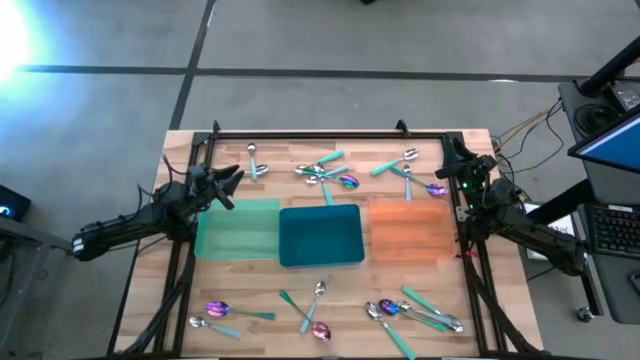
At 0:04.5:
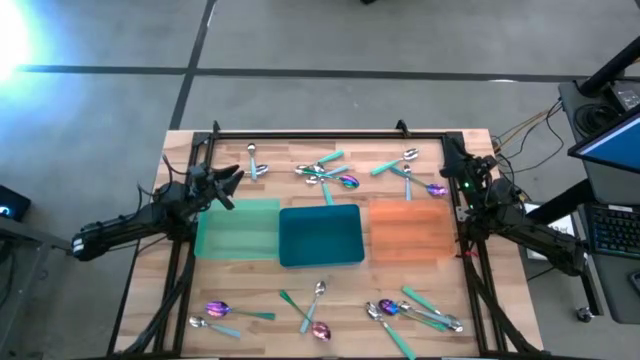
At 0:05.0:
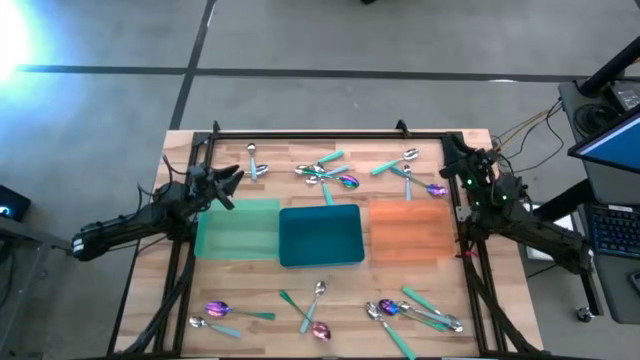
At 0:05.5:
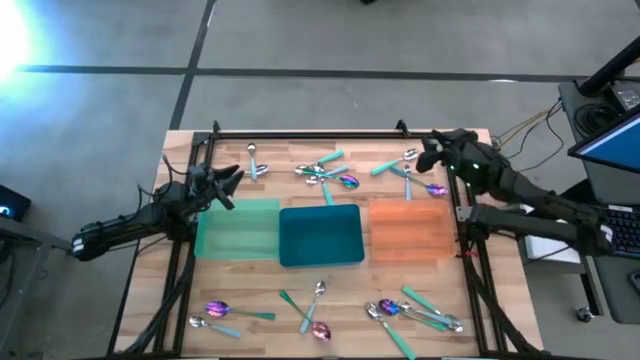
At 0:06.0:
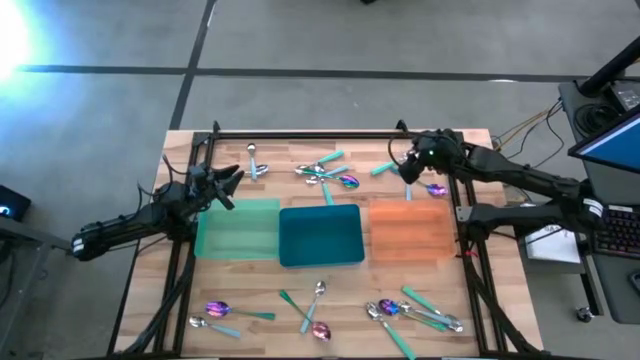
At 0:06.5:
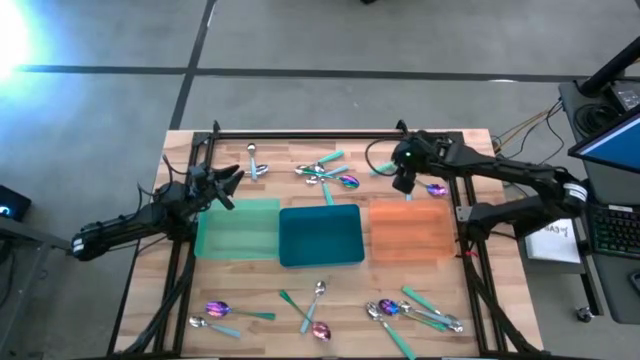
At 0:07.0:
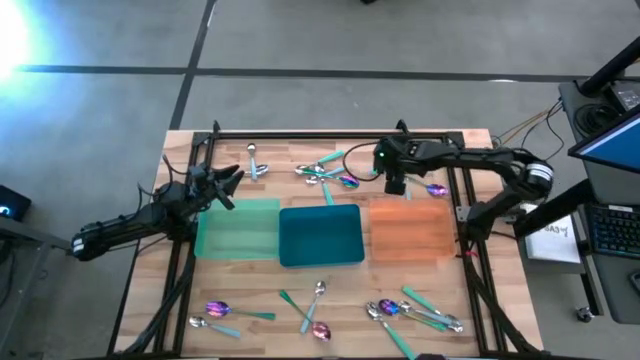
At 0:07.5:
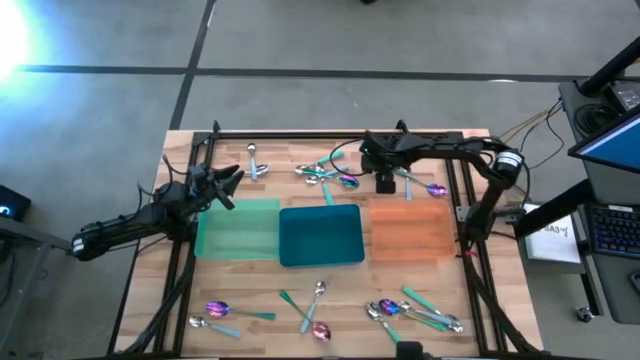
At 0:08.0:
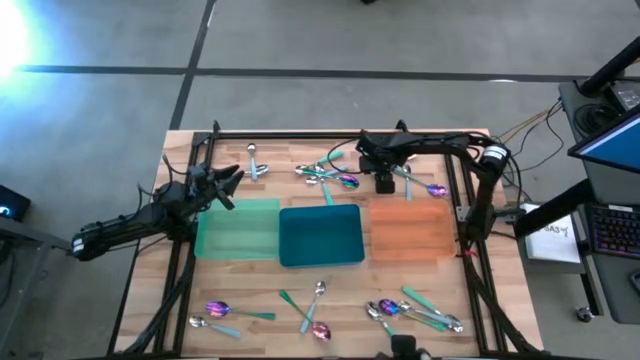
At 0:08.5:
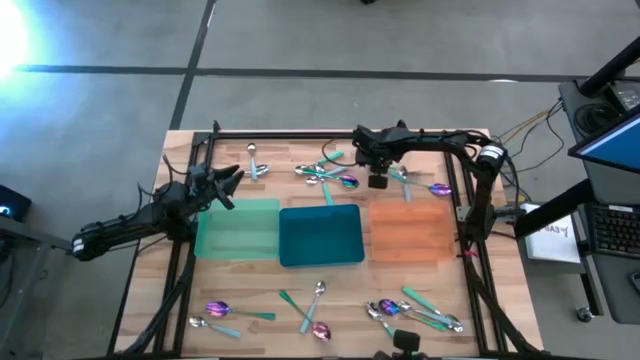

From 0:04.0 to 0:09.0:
Task: Sort silverware by color (type)
Put the green spoon into the orange bin

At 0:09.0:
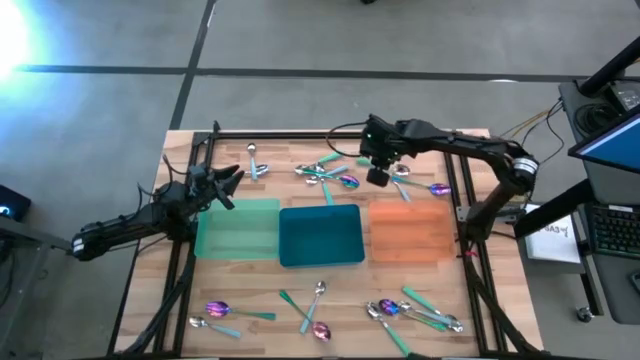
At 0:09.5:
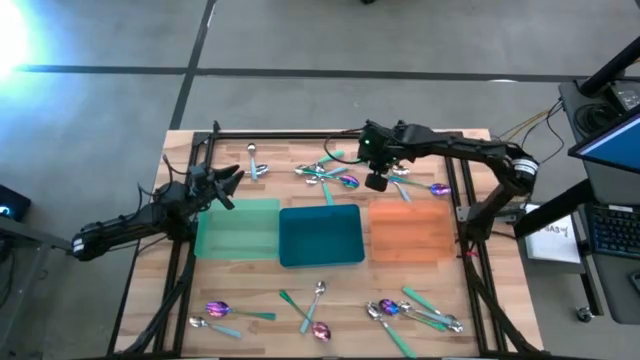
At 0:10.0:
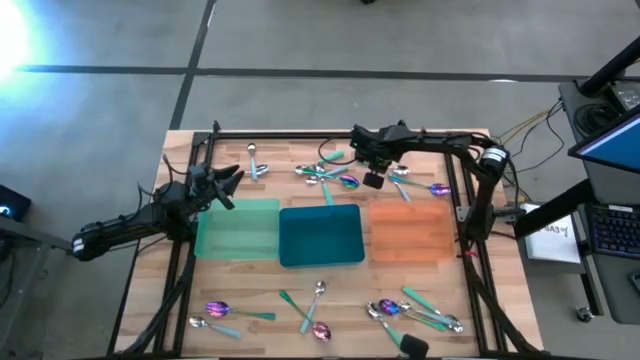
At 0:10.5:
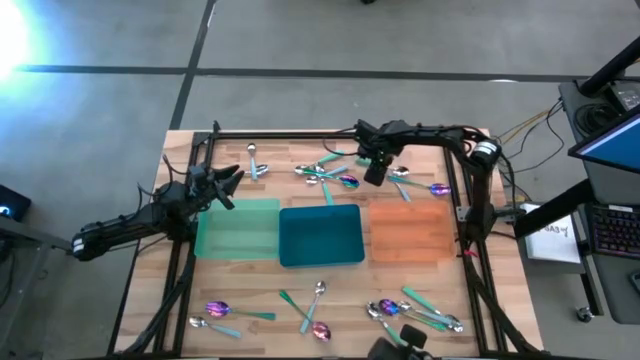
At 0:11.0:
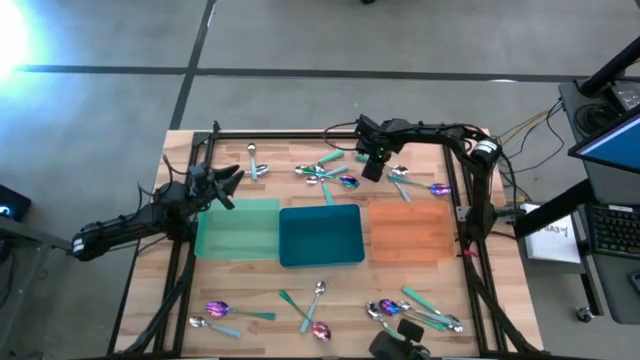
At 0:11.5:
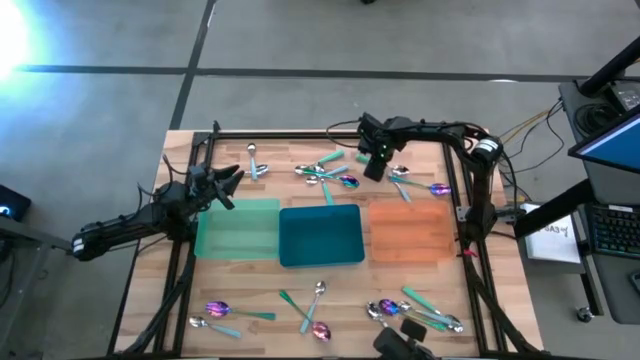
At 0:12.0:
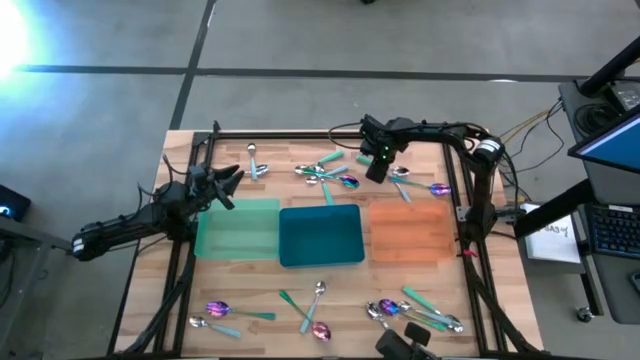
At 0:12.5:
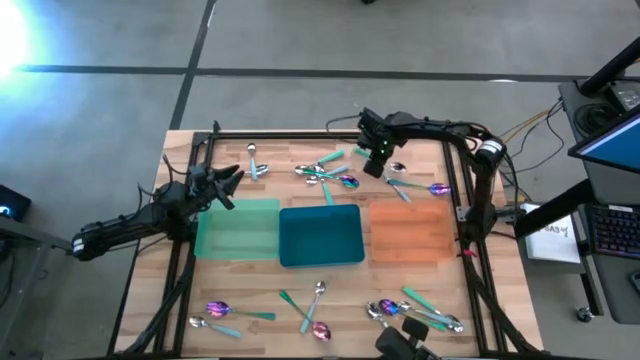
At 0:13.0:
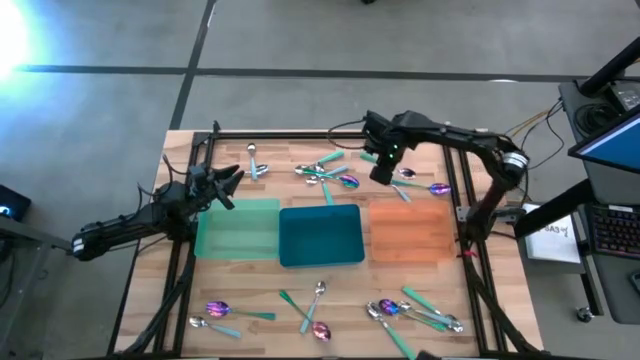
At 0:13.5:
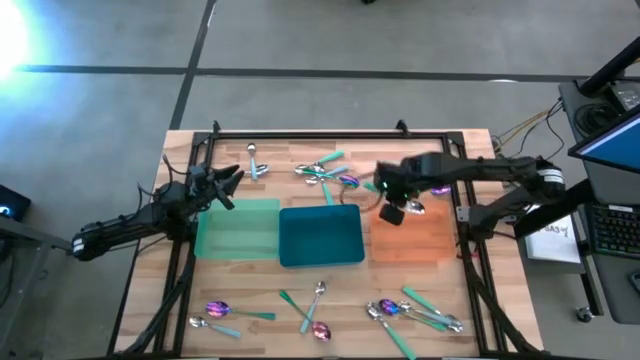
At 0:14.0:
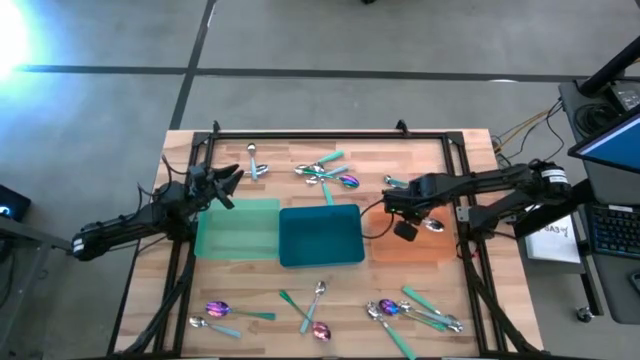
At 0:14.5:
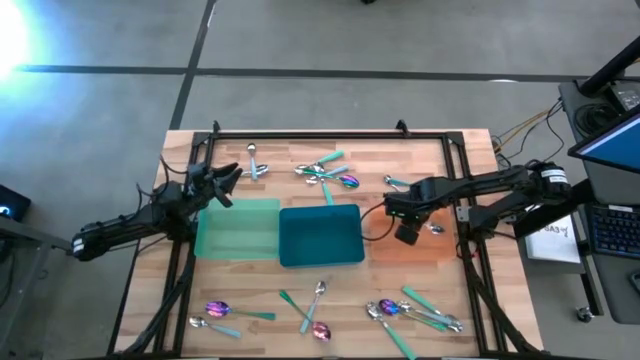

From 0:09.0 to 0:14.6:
Put the green spoon into the orange bin

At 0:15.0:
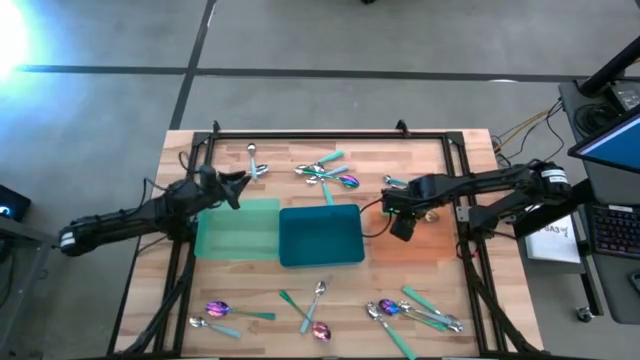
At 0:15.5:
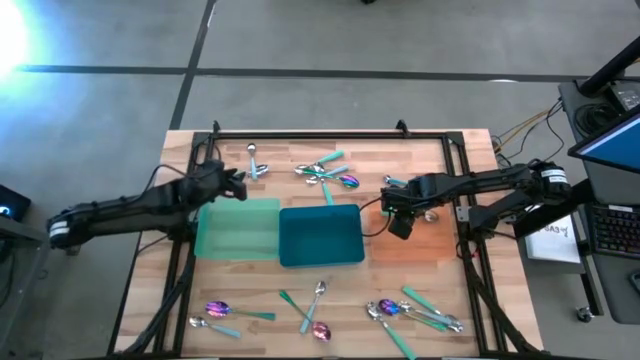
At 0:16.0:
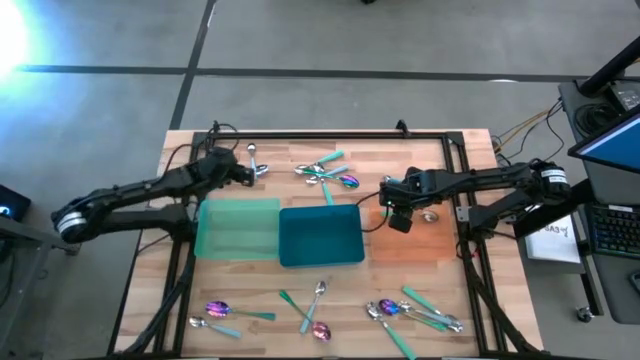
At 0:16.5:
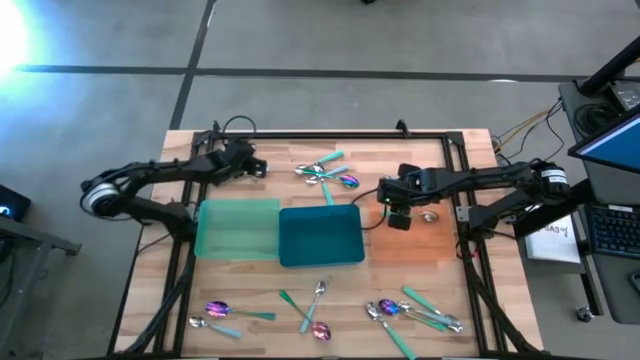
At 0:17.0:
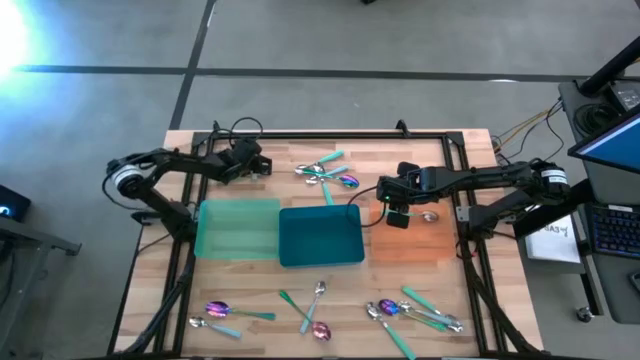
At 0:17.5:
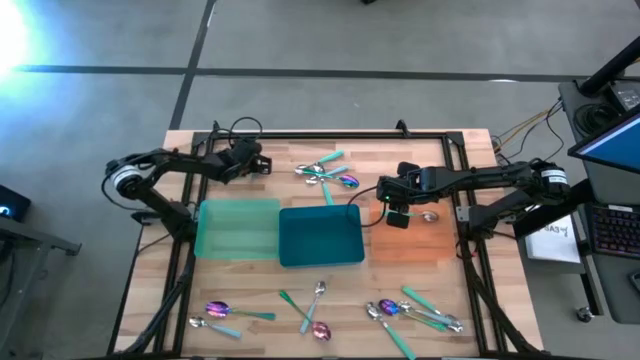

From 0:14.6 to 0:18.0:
Put the blue spoon into the blue bin

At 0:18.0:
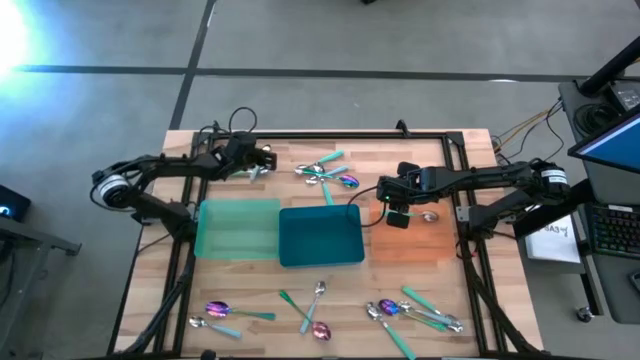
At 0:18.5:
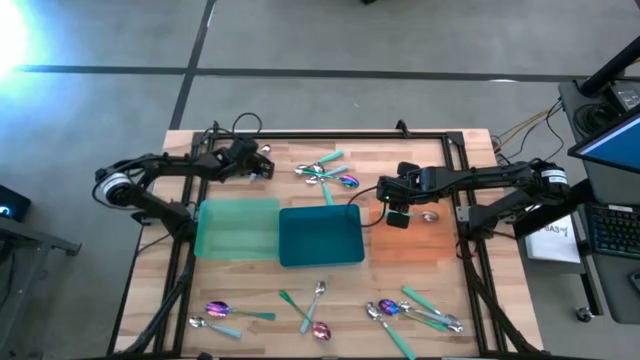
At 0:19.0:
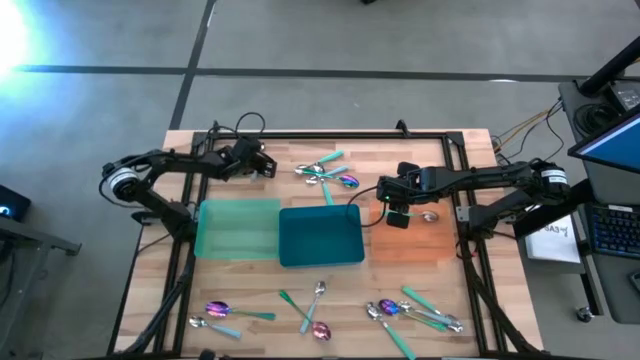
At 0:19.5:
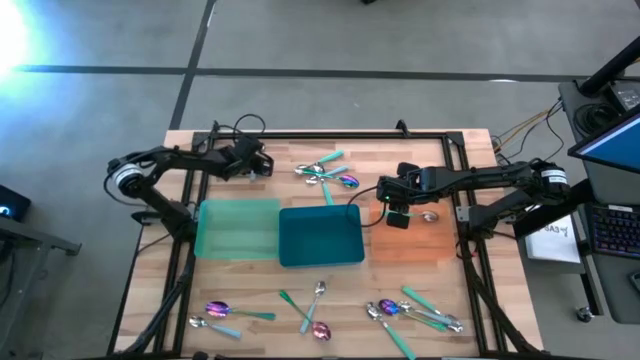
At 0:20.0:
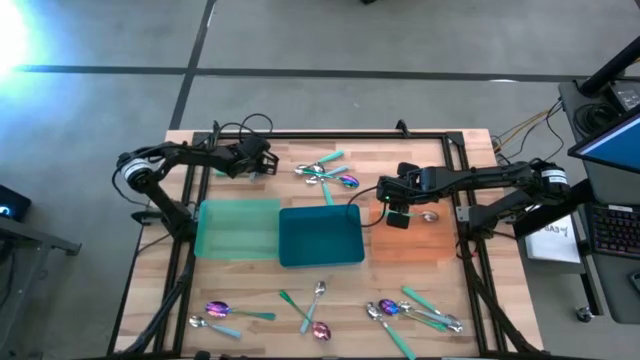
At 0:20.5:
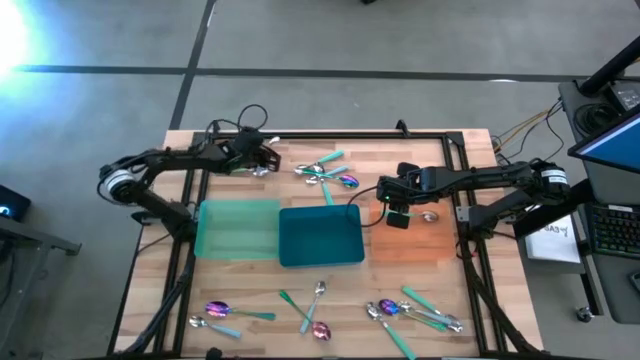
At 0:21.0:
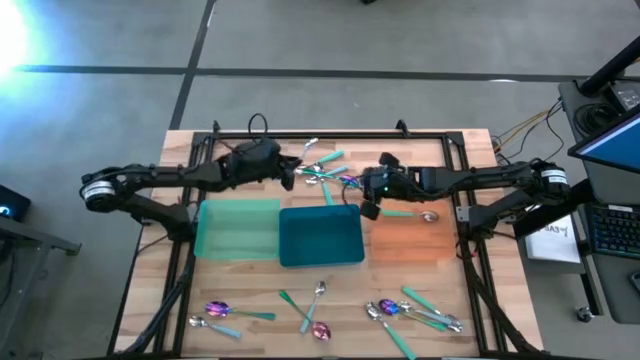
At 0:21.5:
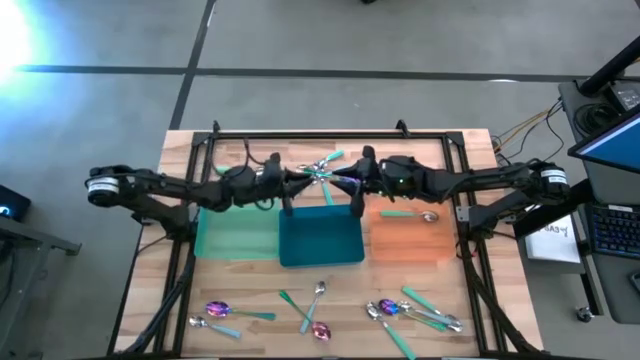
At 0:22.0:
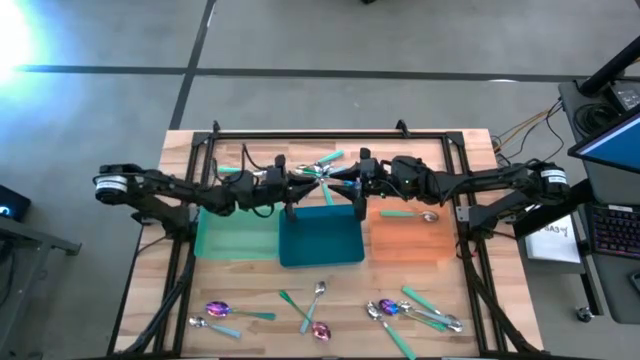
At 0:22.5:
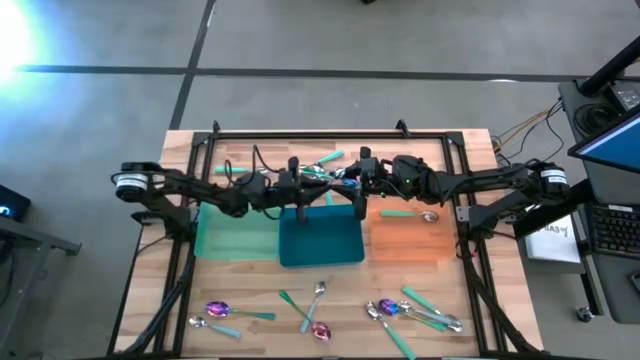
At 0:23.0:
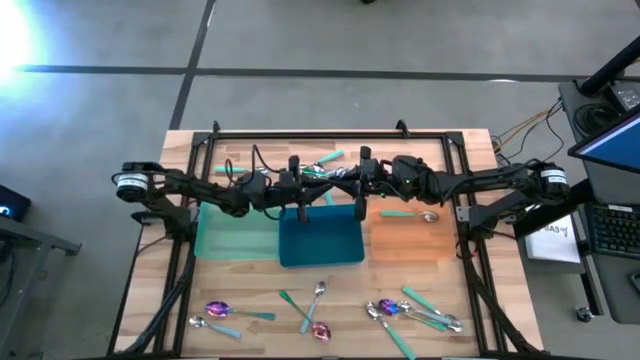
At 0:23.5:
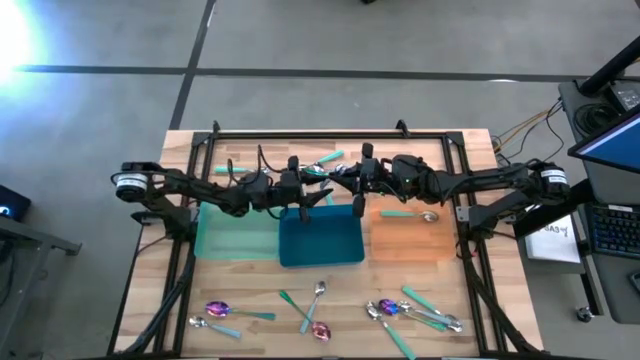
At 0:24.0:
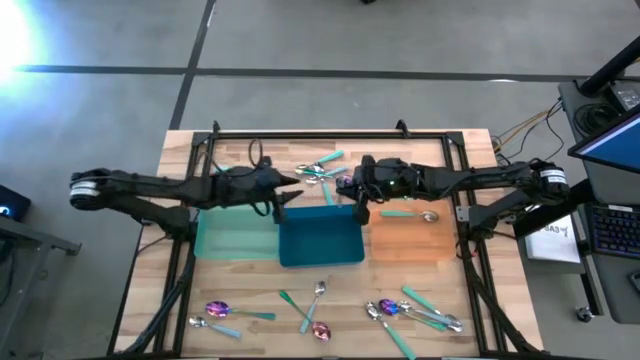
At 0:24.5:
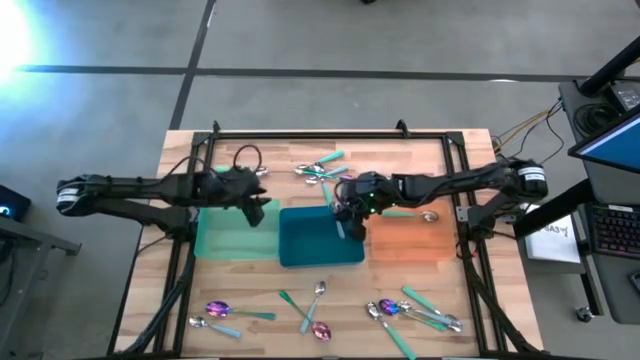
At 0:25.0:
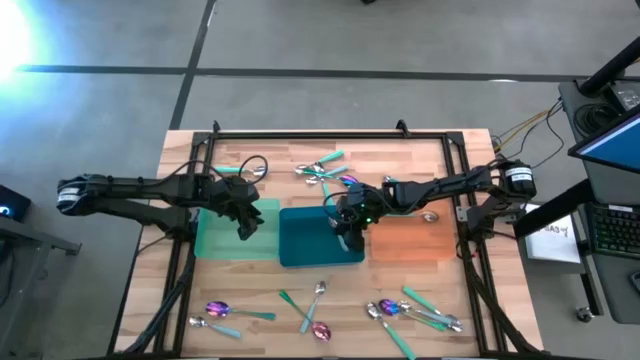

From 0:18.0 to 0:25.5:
Put the blue spoon into the blue bin
